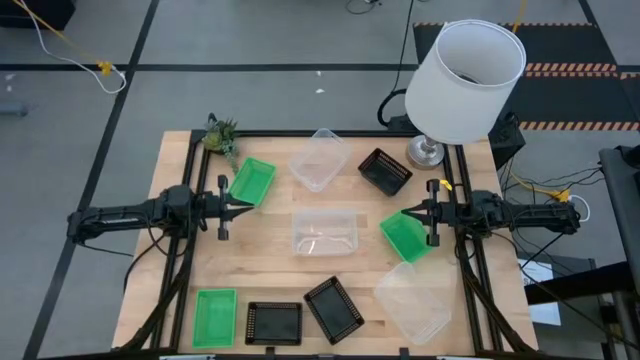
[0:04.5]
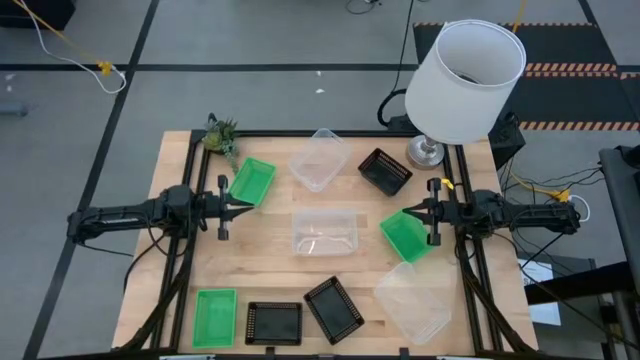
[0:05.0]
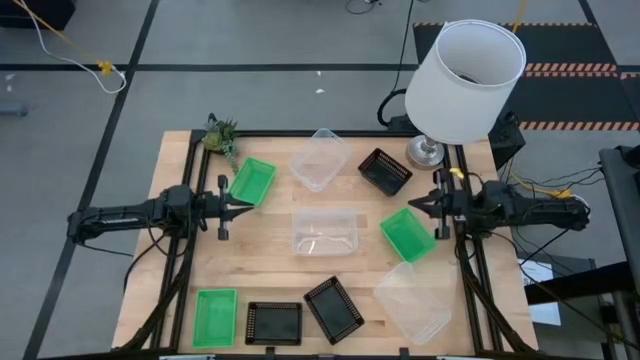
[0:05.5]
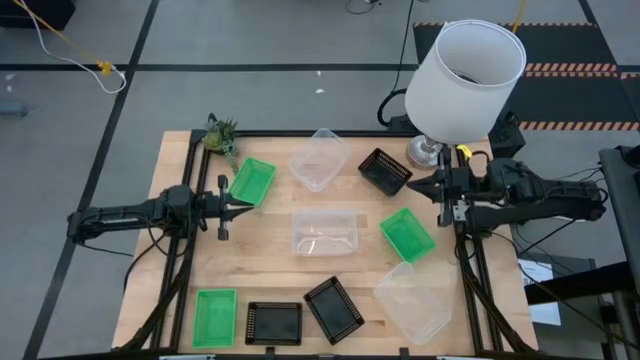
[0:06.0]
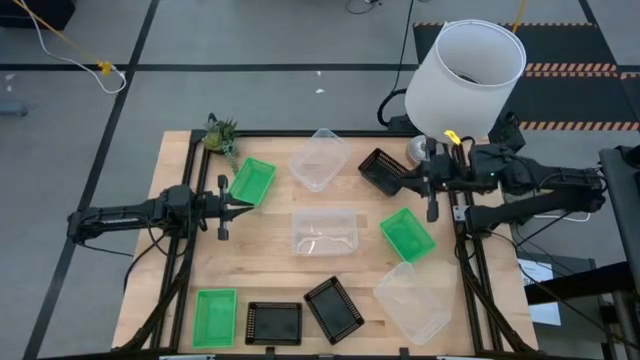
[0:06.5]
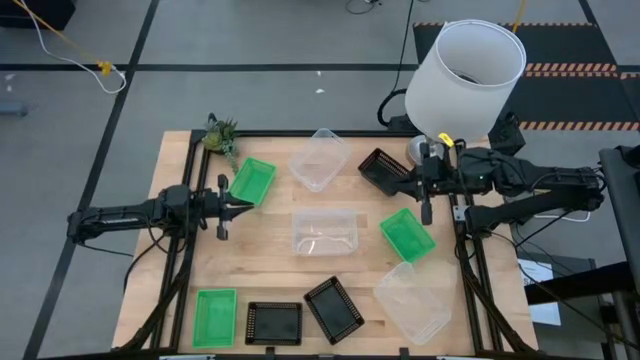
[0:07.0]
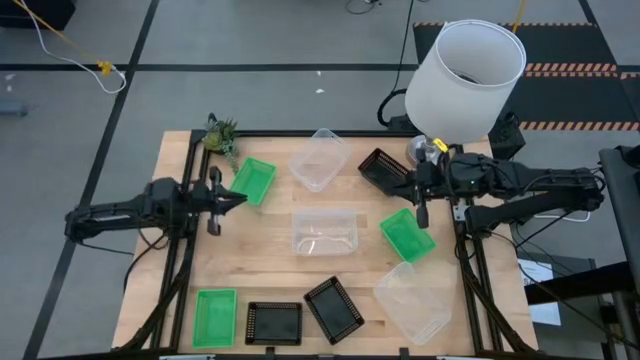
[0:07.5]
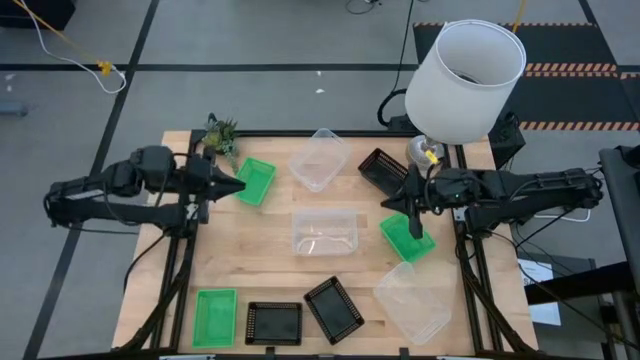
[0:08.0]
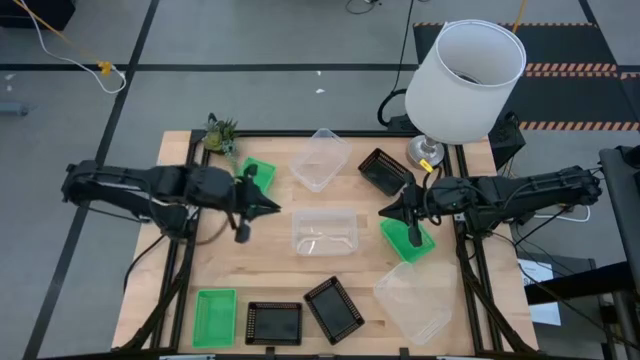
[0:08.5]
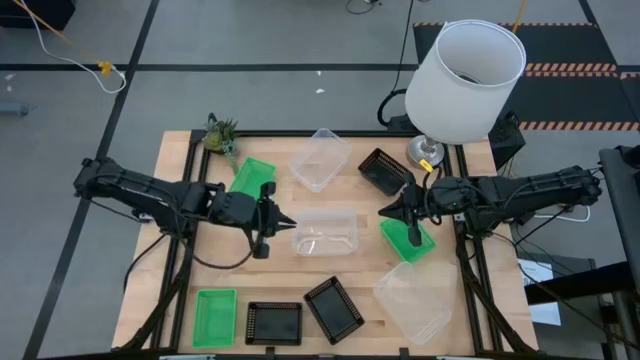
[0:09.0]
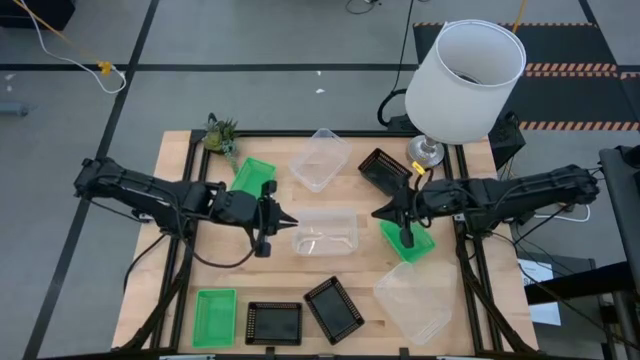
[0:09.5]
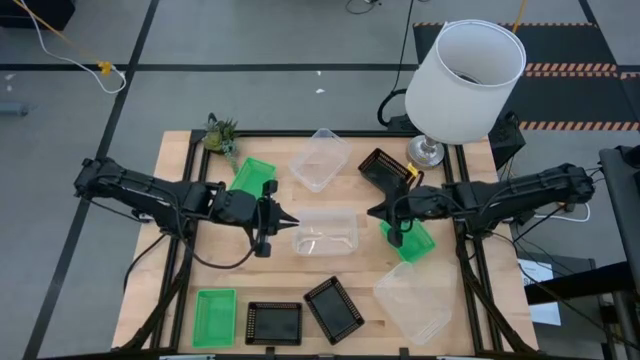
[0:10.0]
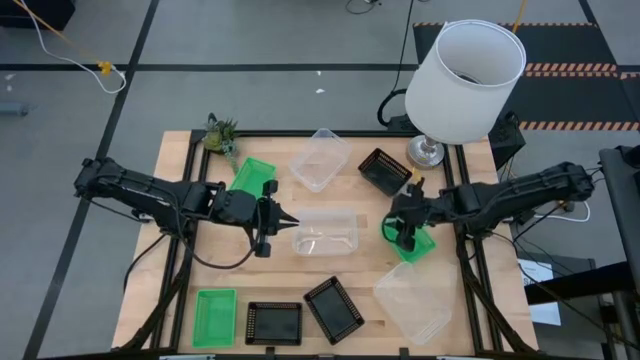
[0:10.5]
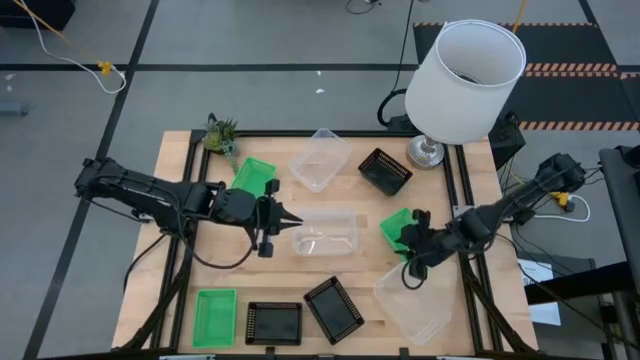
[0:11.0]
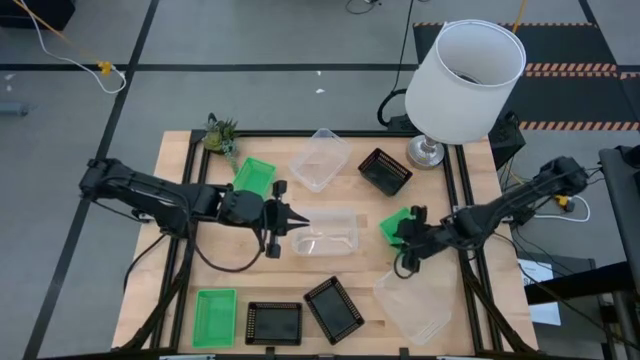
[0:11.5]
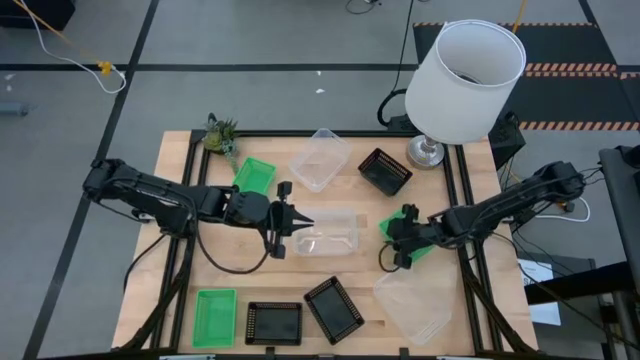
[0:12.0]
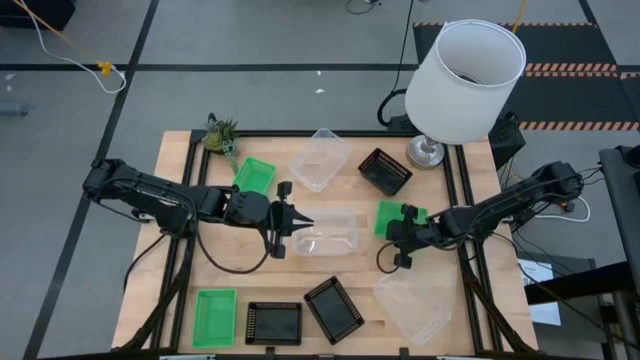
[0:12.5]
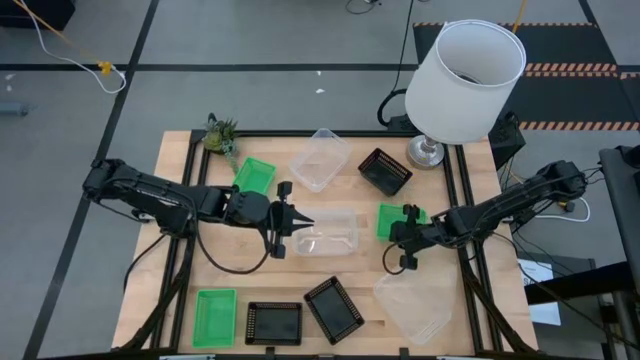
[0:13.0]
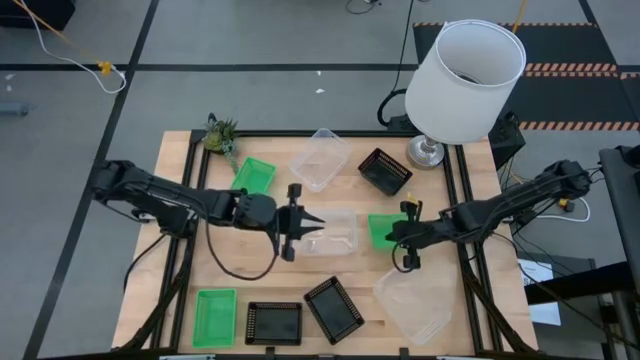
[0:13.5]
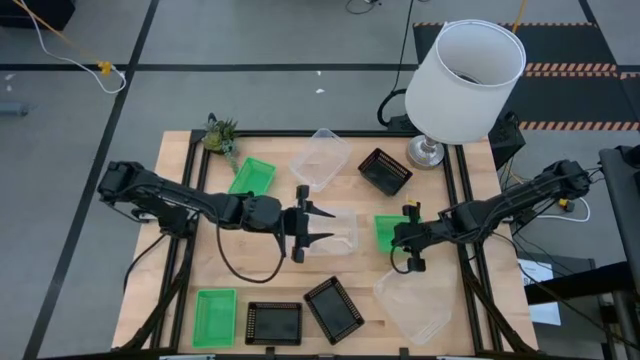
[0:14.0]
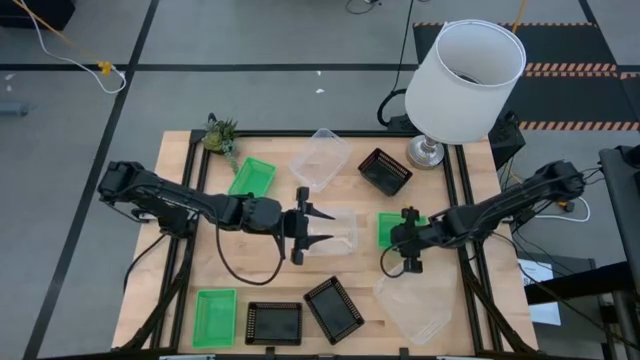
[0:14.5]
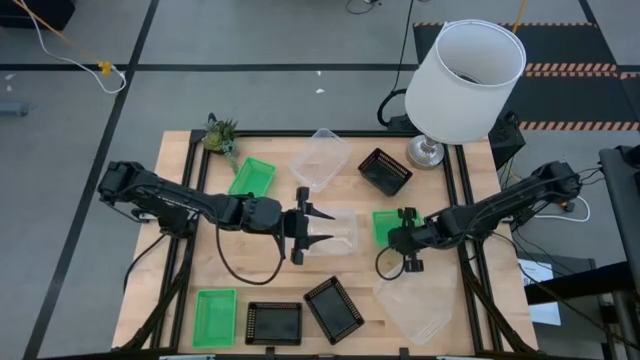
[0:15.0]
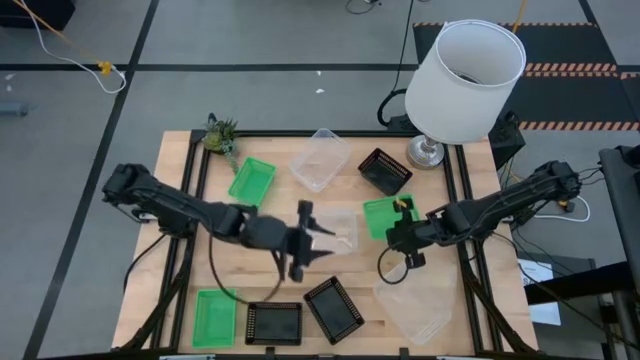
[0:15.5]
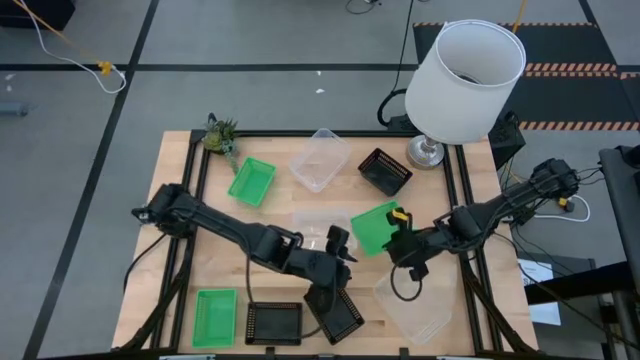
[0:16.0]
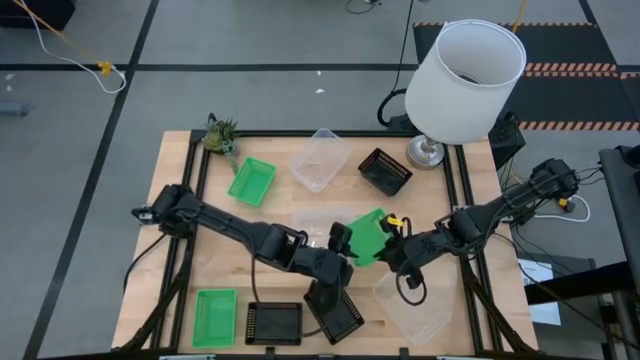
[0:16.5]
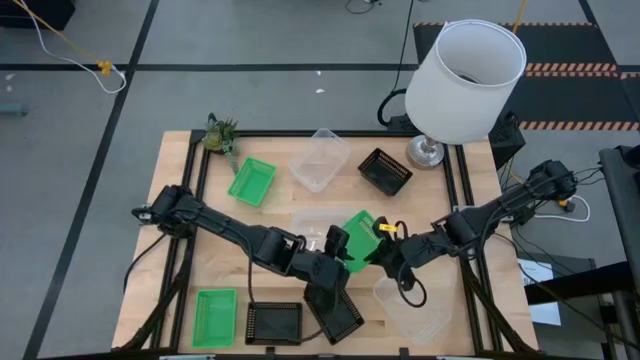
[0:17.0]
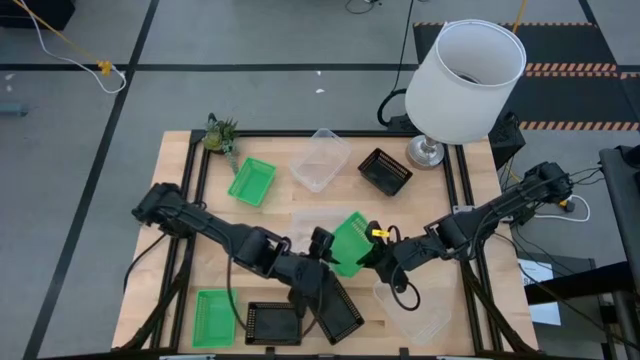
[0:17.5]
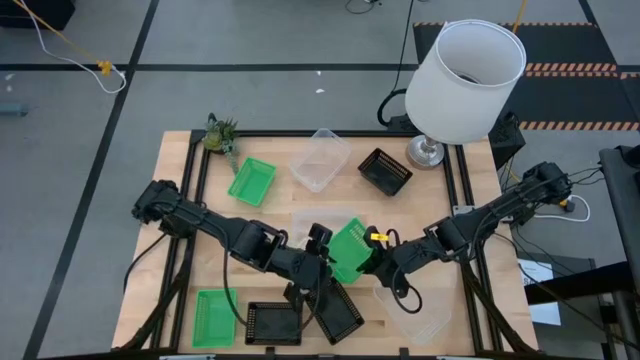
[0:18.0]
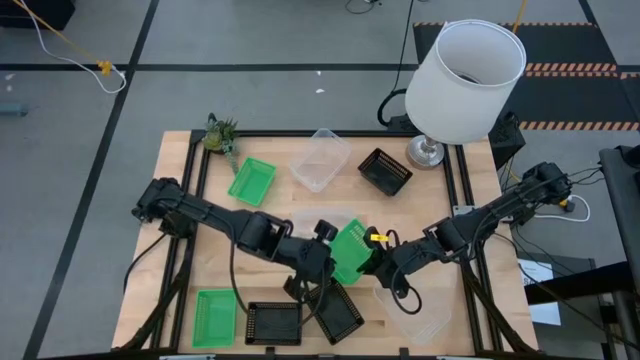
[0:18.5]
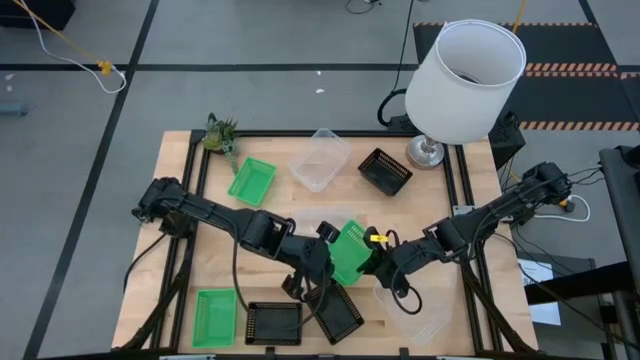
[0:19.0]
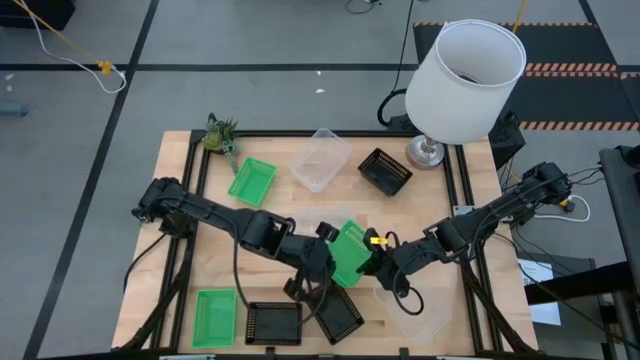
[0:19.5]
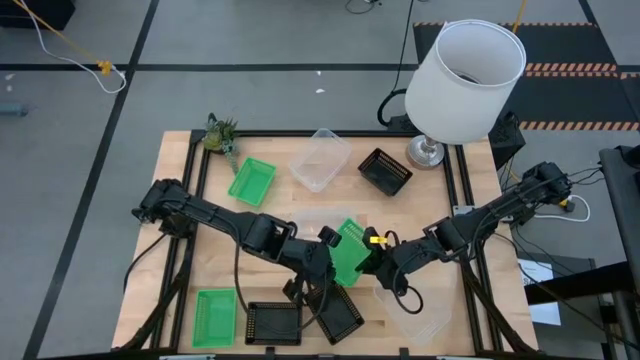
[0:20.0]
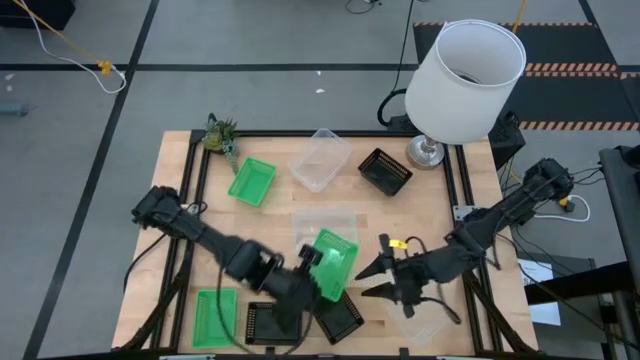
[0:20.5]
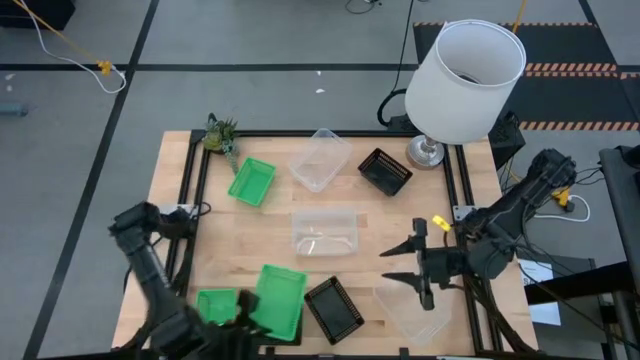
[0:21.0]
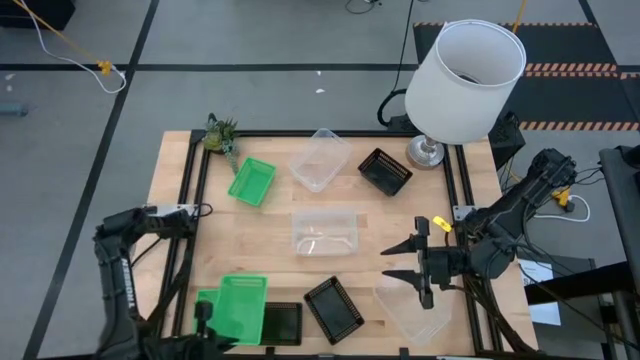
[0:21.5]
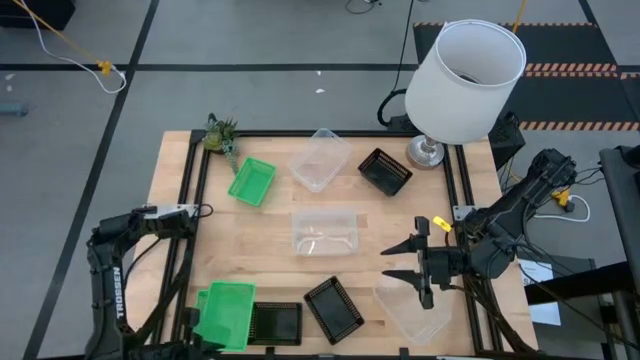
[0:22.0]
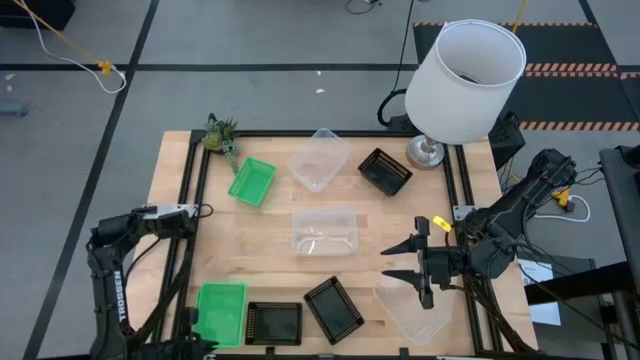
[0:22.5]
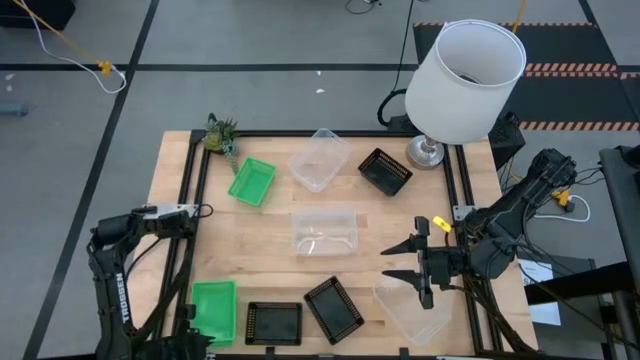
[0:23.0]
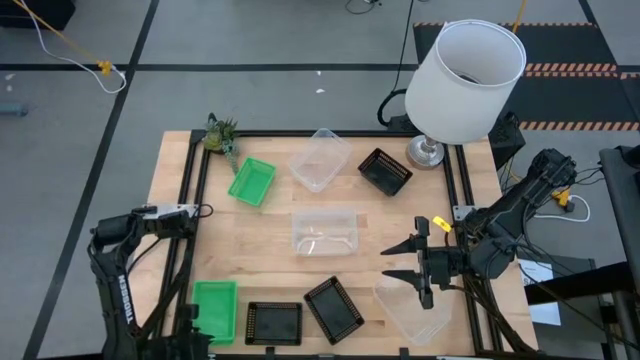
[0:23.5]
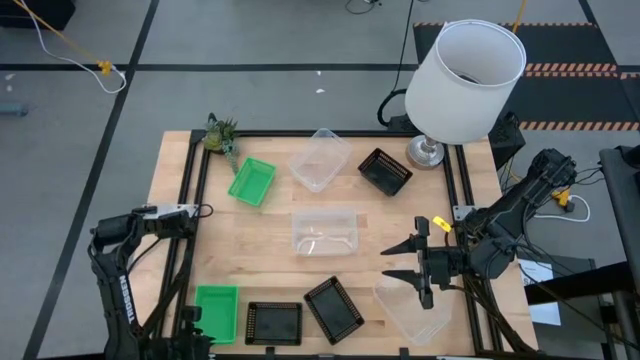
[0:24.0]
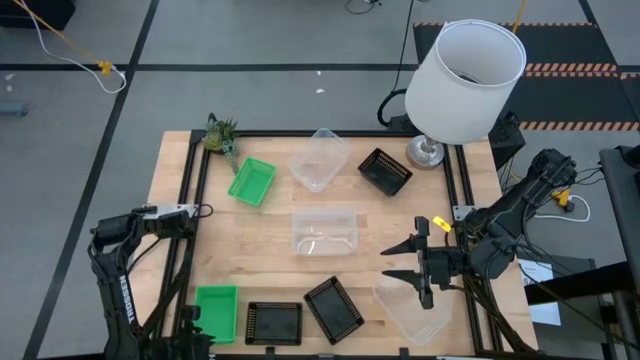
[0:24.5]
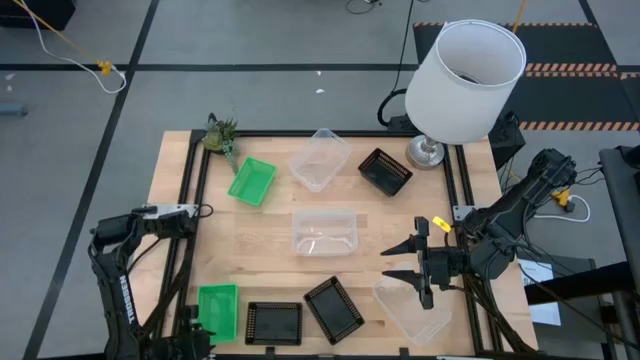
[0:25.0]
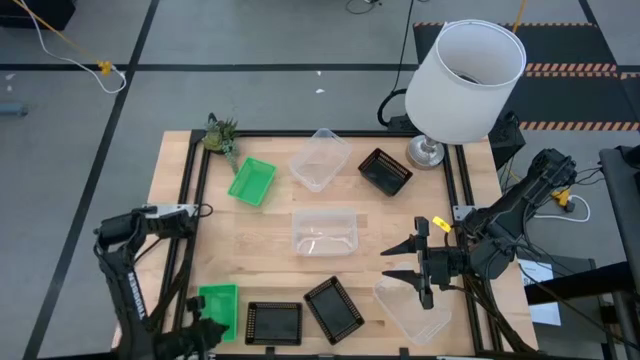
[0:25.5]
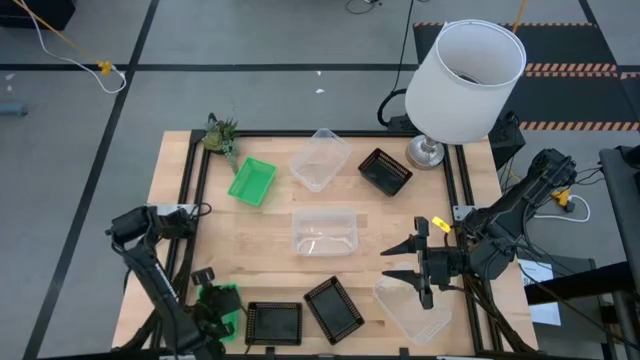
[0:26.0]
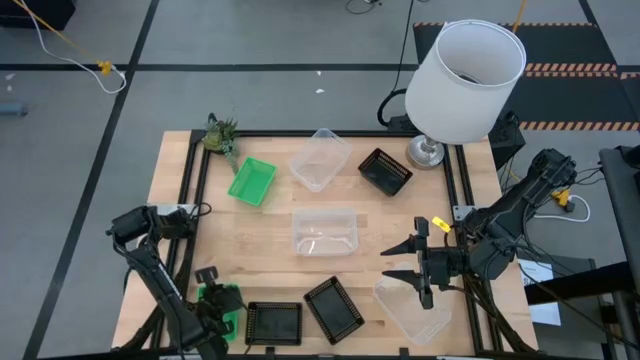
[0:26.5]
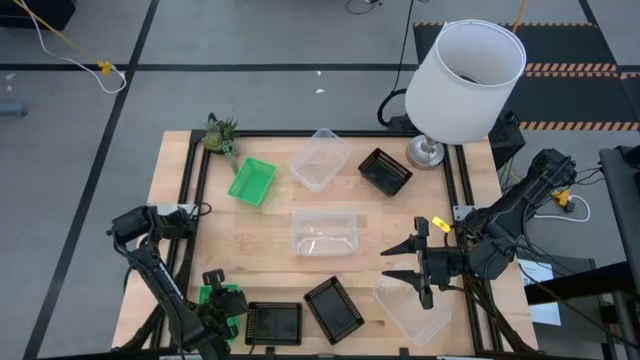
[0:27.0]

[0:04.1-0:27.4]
Stack the middle right green bin on the bottom left green bin
